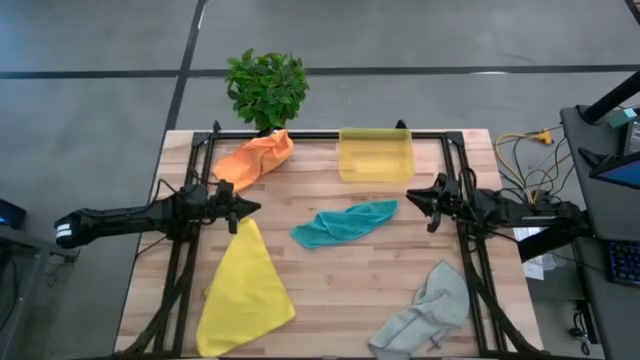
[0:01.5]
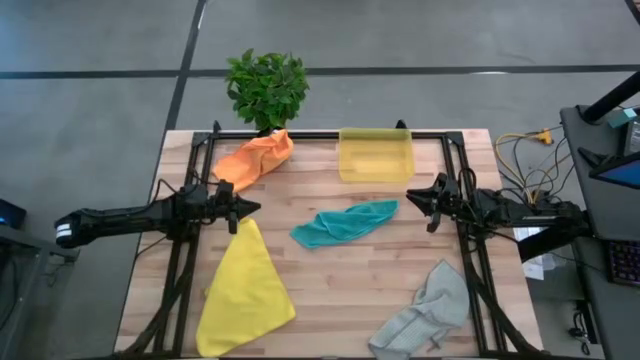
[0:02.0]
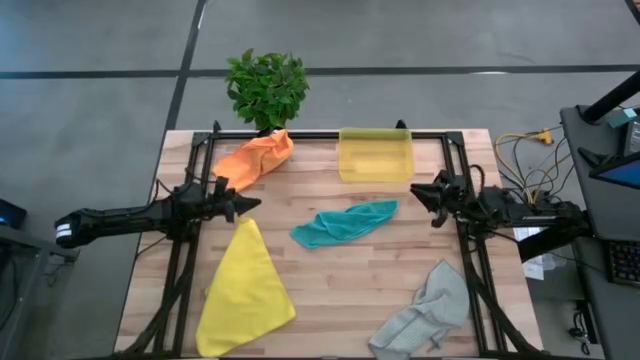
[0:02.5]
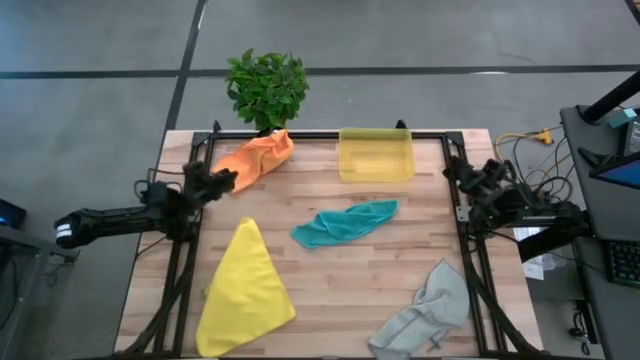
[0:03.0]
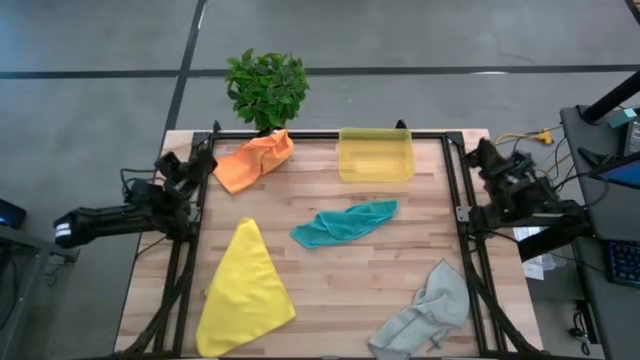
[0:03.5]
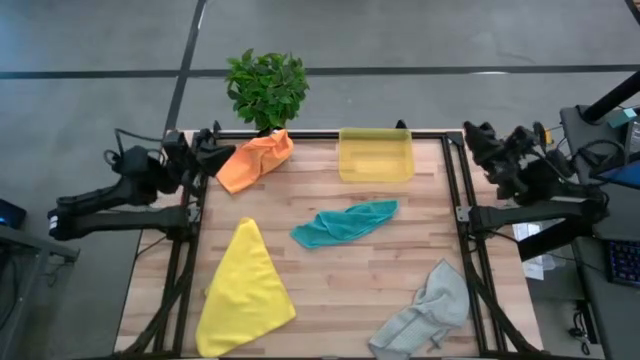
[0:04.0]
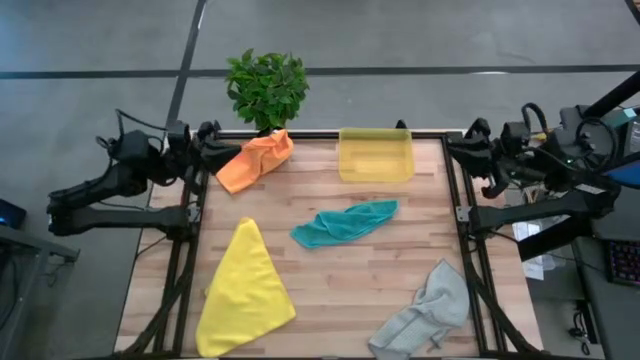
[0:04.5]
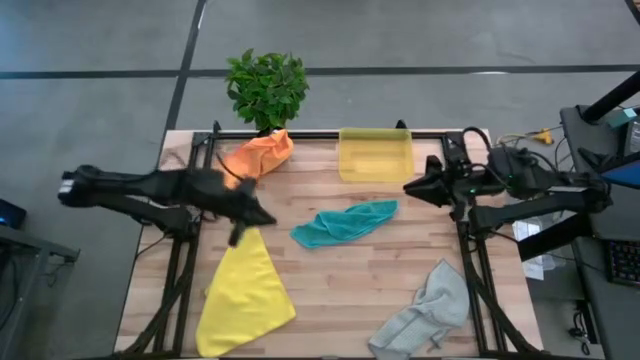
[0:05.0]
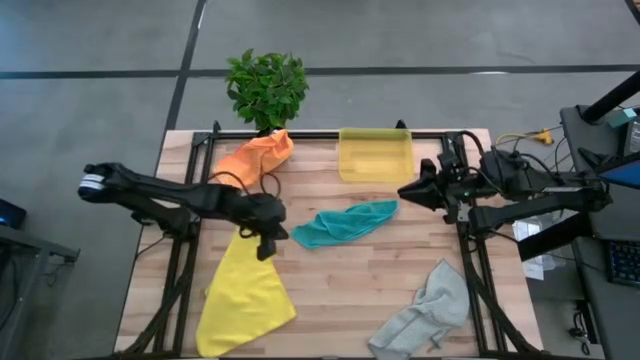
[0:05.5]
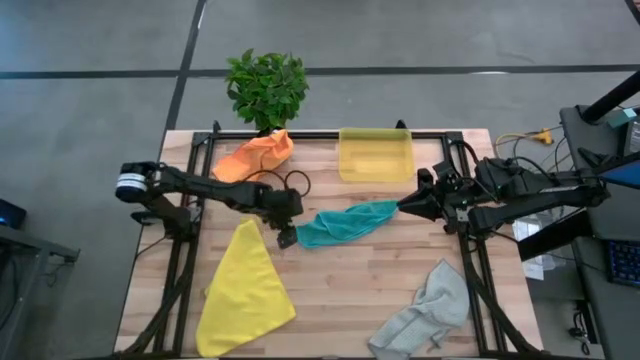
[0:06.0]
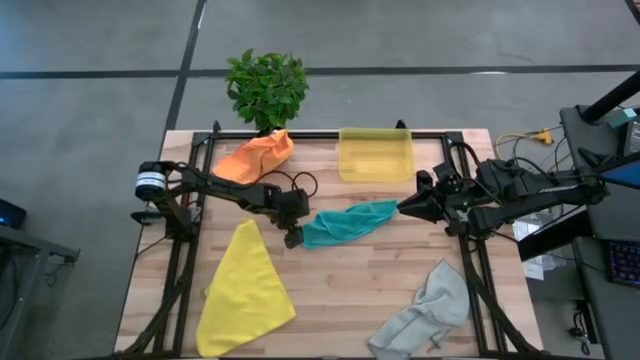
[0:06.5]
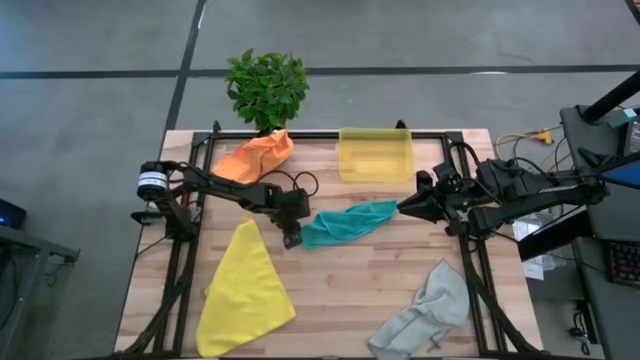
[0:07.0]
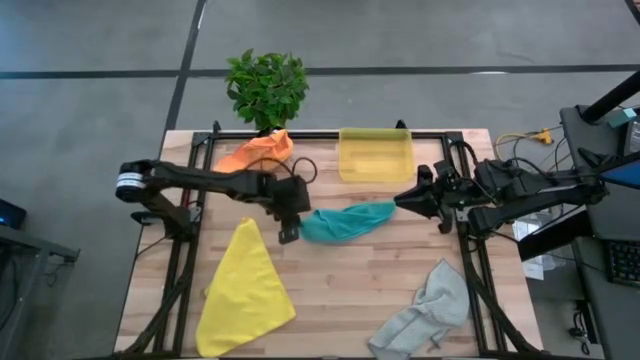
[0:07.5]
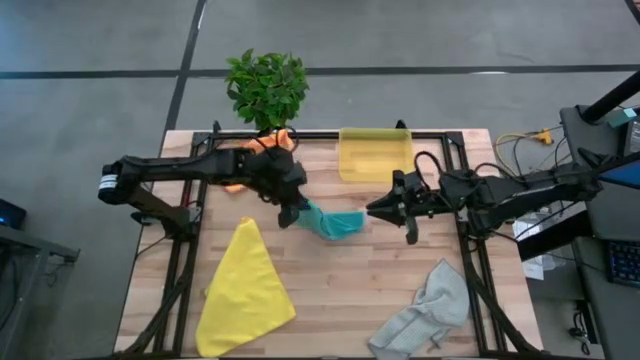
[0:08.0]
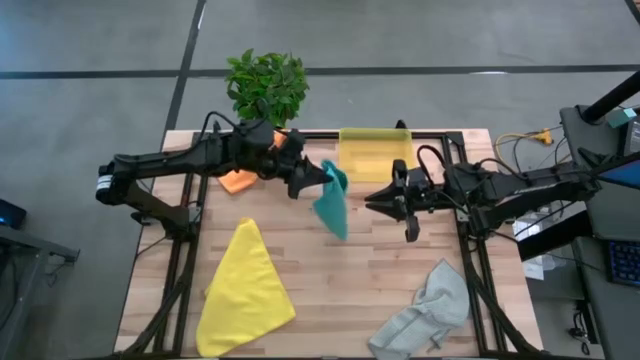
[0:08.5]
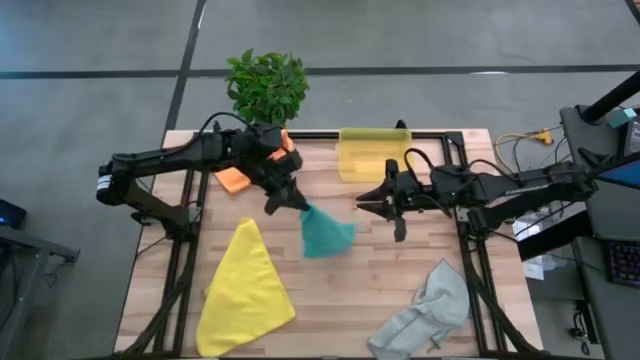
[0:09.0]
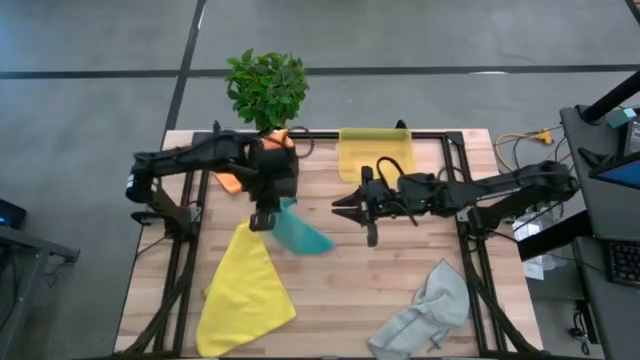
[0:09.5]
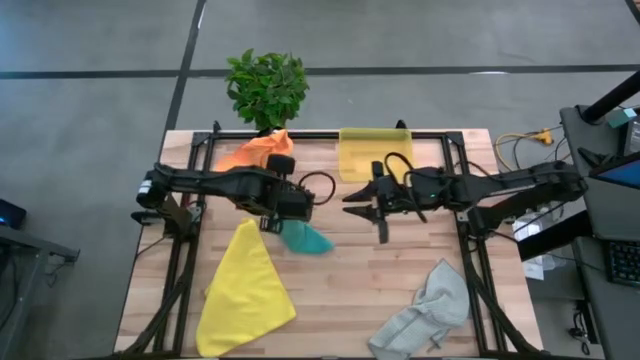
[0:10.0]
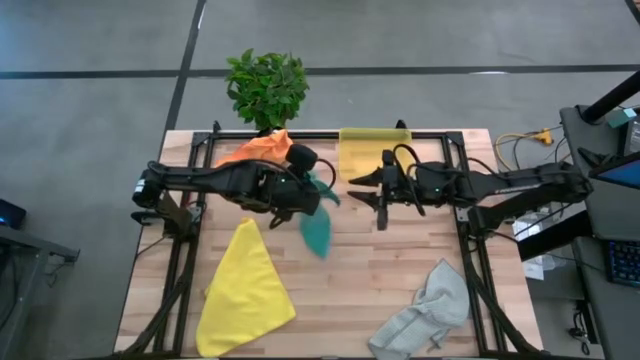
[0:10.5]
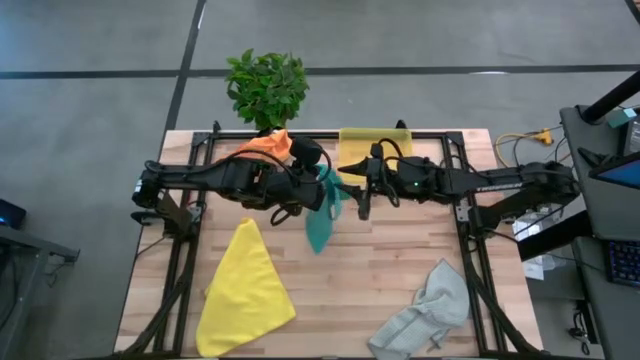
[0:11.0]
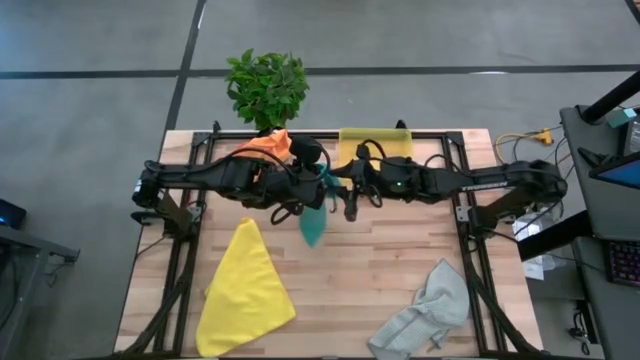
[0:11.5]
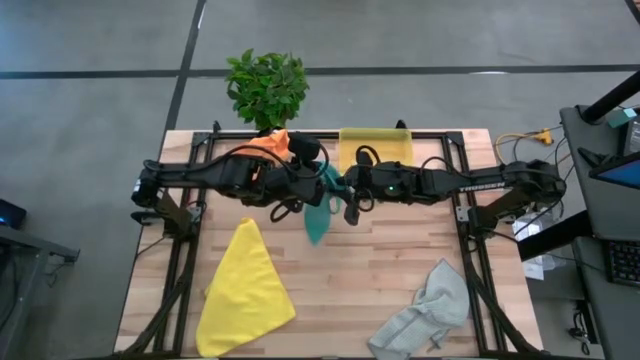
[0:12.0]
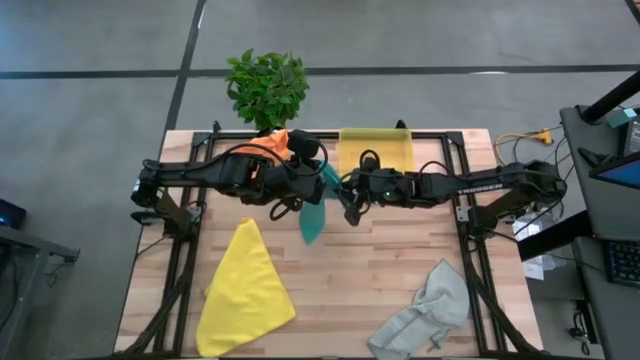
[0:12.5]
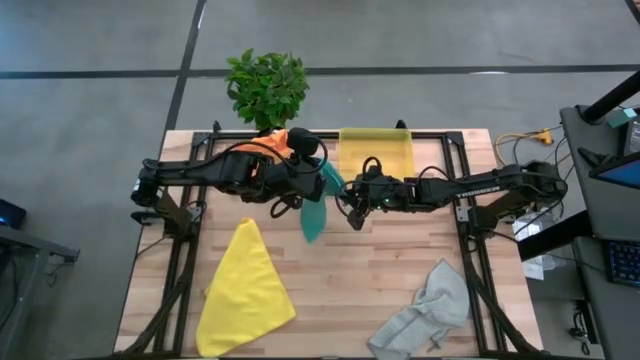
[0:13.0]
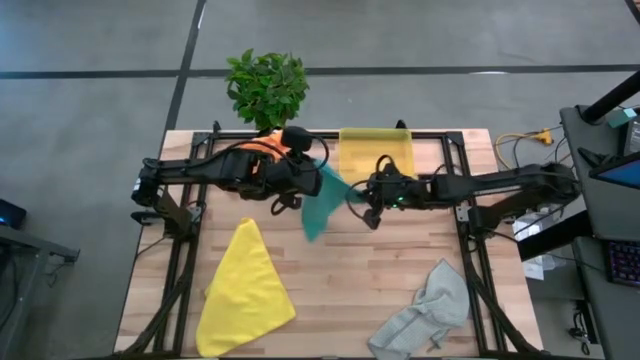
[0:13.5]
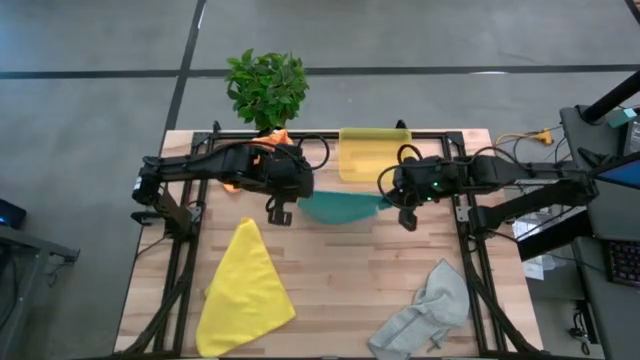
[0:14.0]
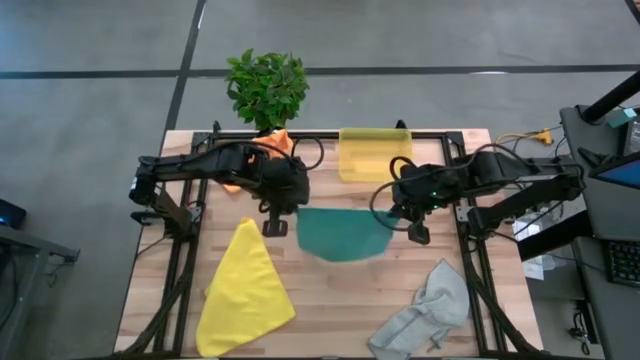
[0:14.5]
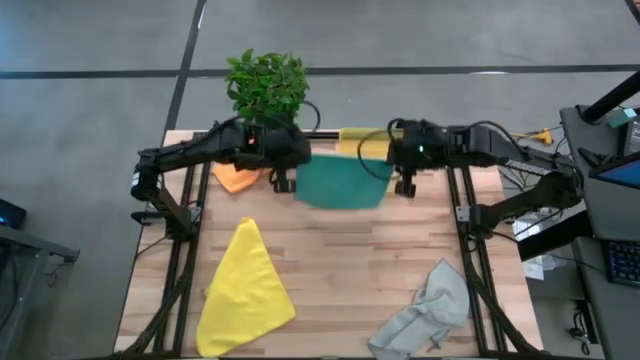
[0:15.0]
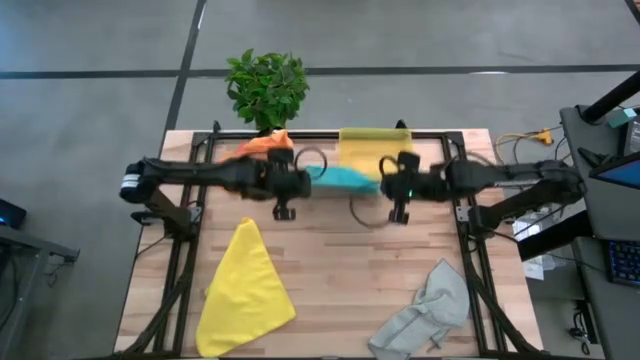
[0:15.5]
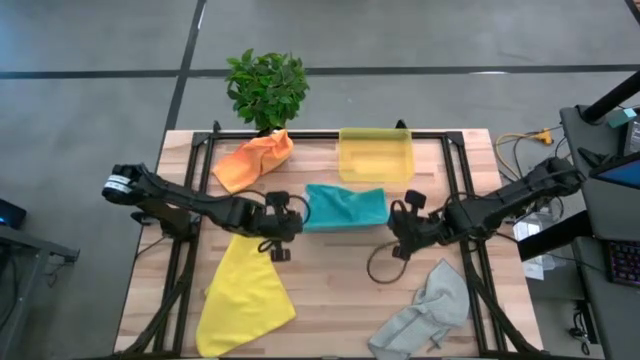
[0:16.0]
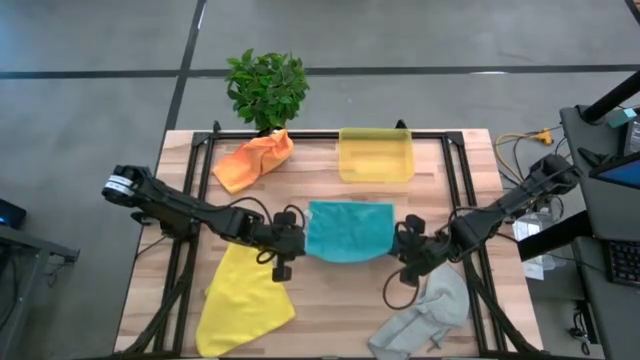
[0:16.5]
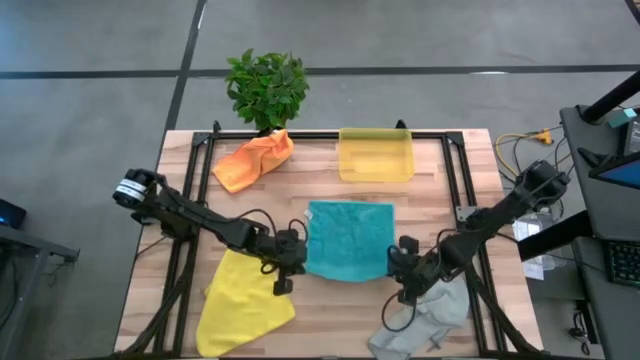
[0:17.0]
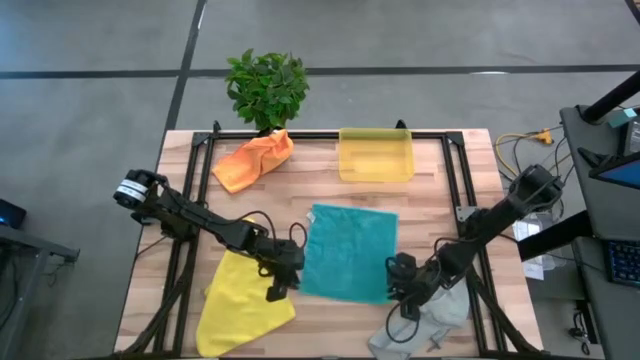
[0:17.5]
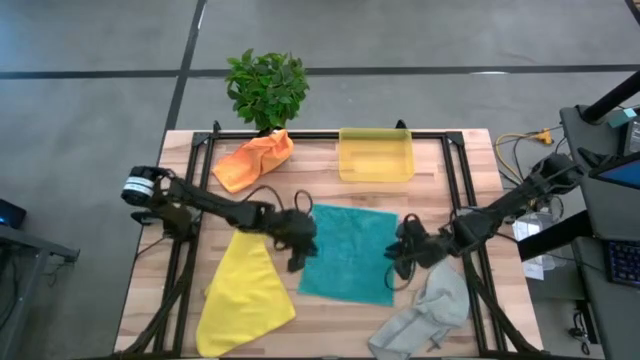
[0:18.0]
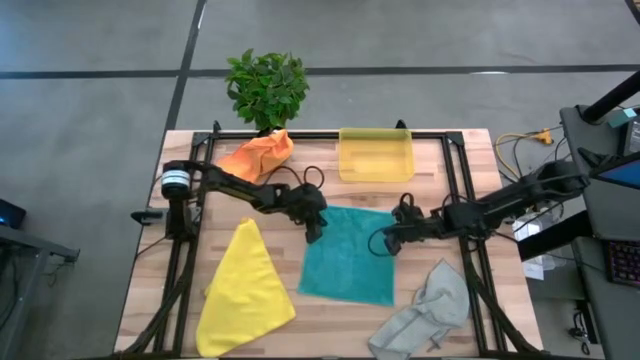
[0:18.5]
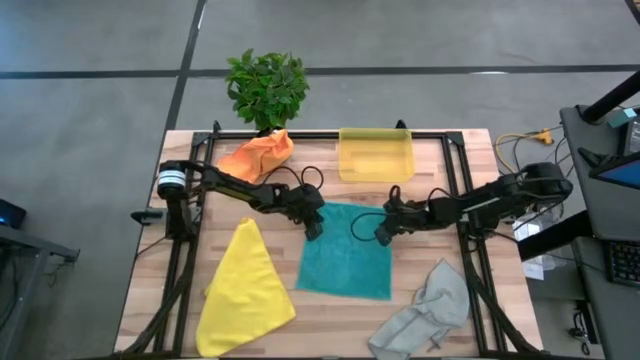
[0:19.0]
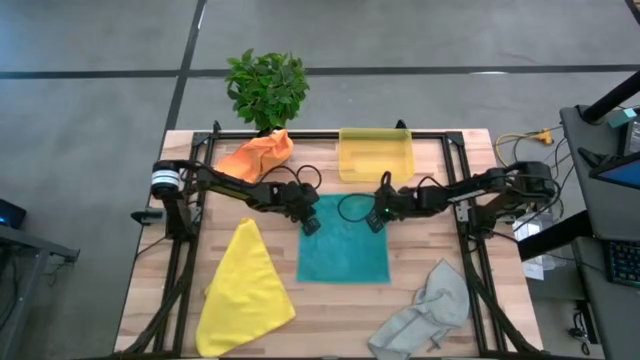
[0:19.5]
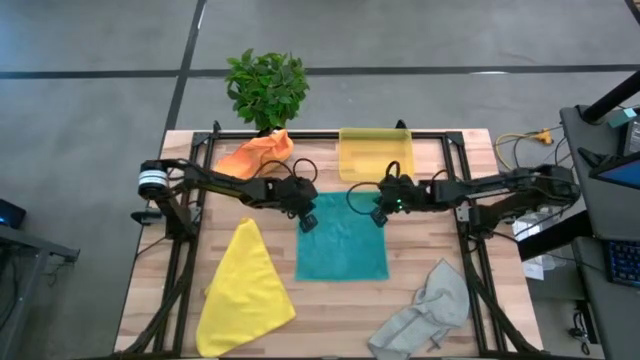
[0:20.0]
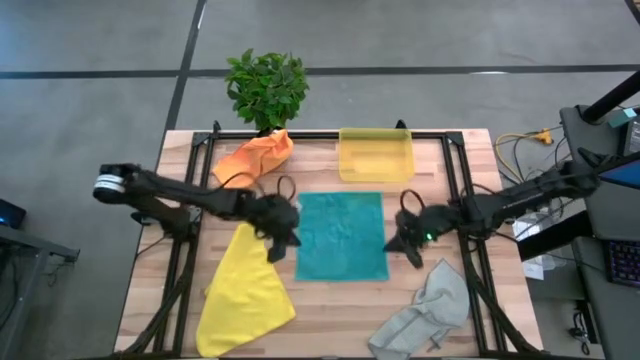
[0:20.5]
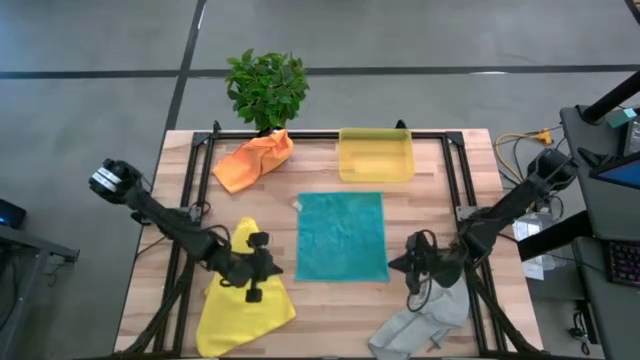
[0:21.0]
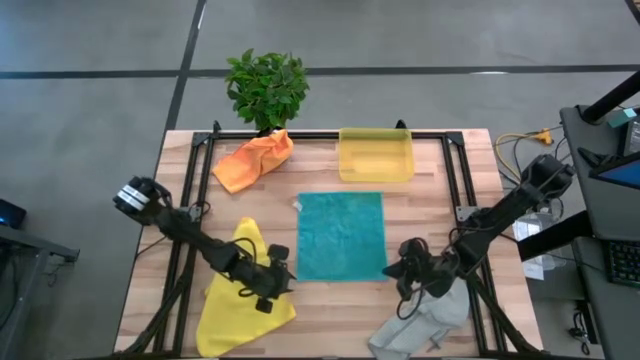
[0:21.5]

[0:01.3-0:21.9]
Task: Fold microfiber towels
Fold the blue microfiber towel
